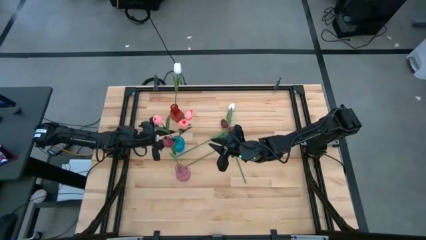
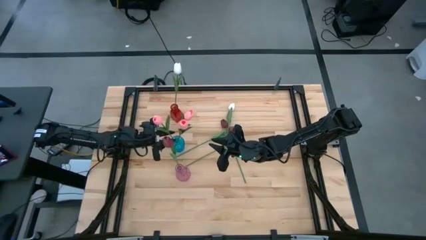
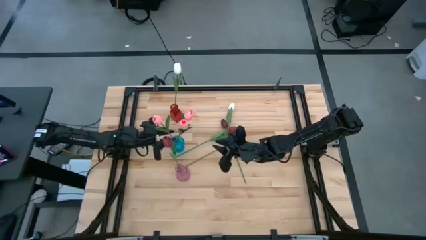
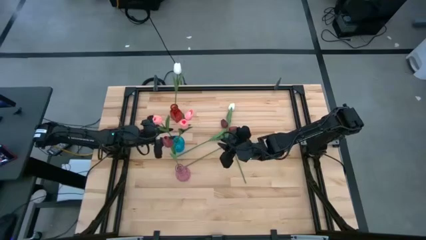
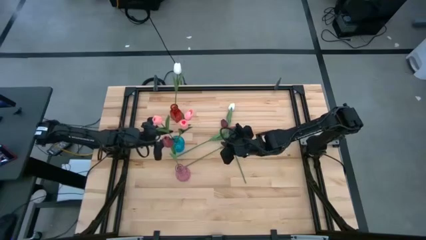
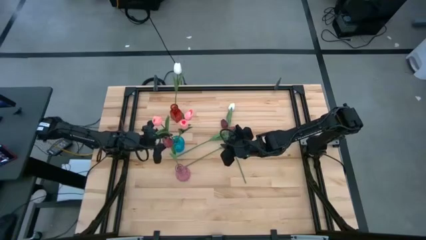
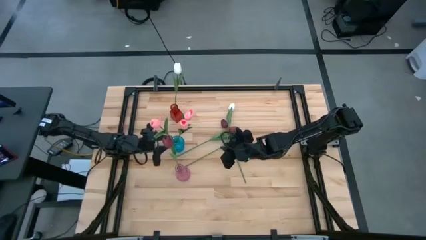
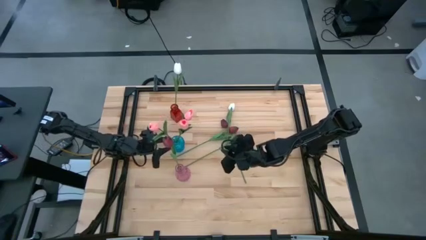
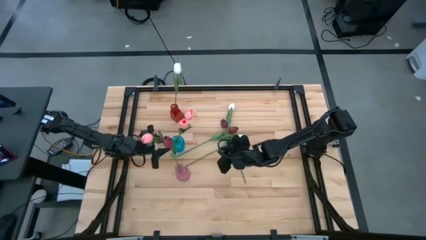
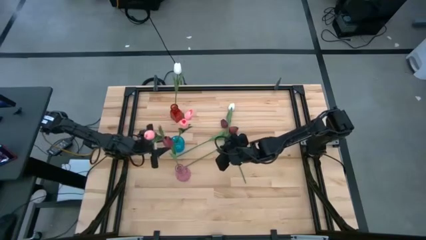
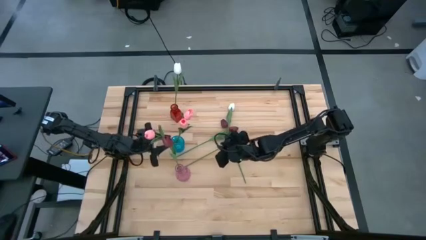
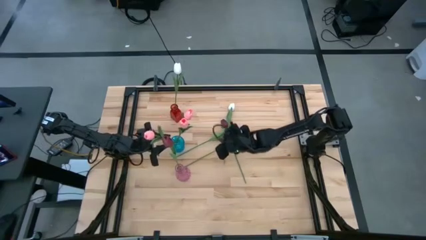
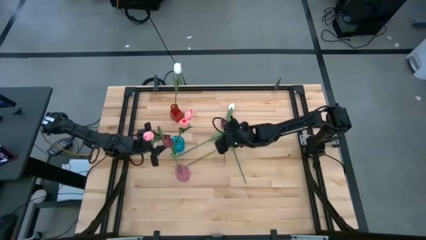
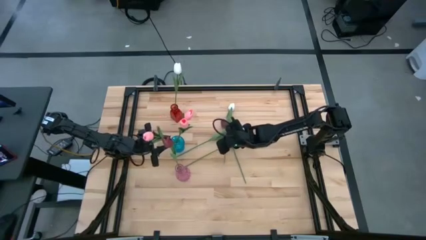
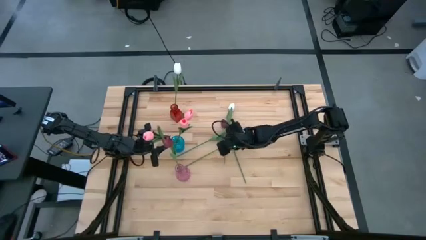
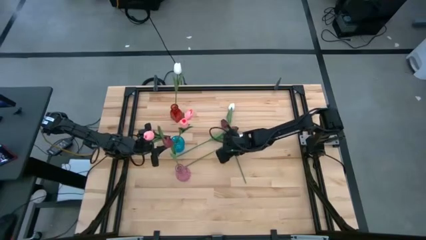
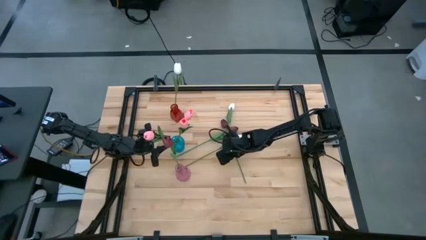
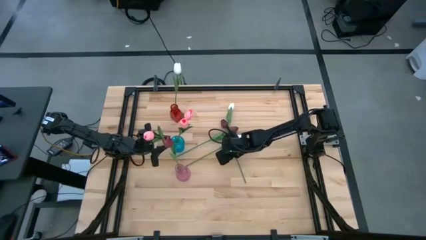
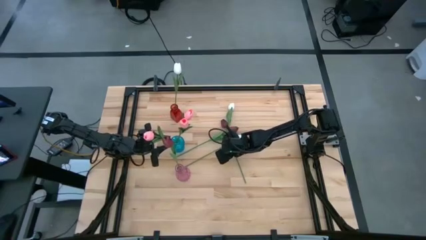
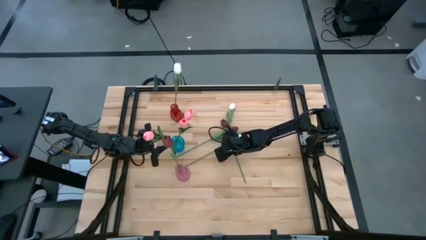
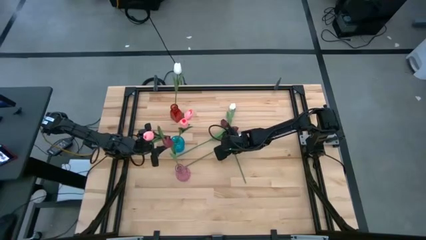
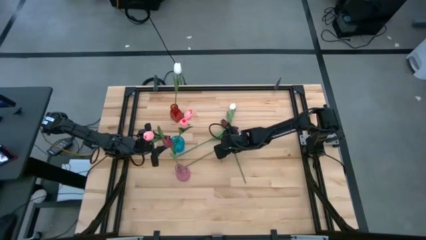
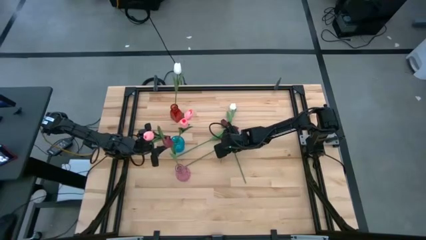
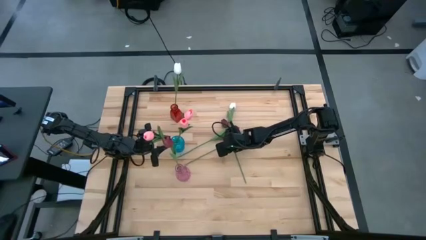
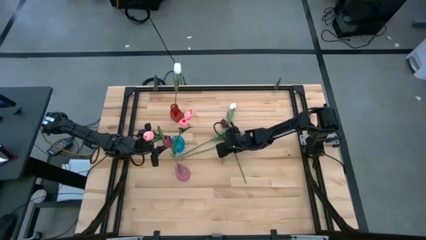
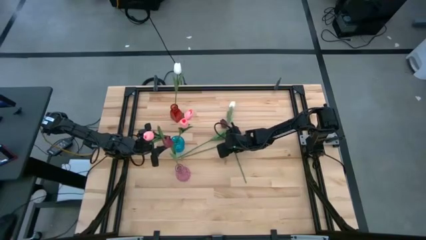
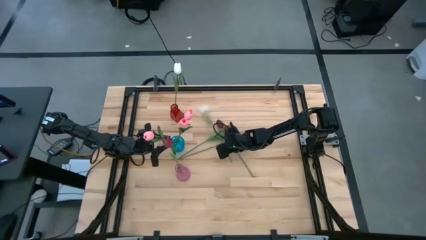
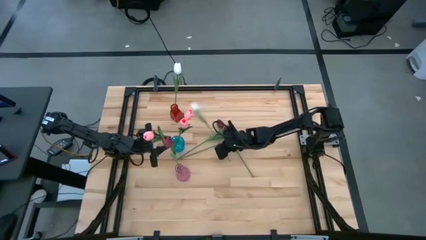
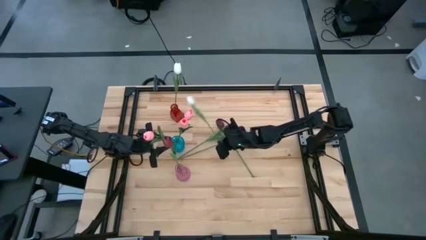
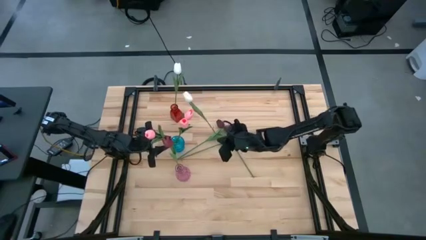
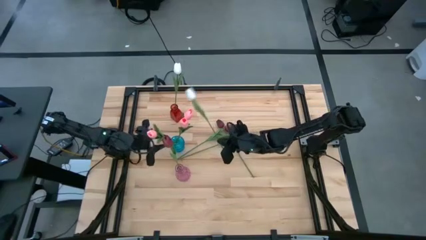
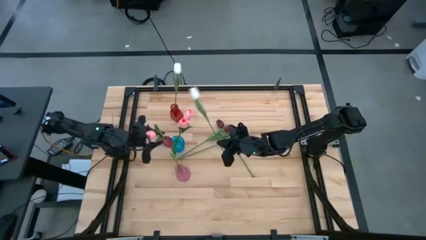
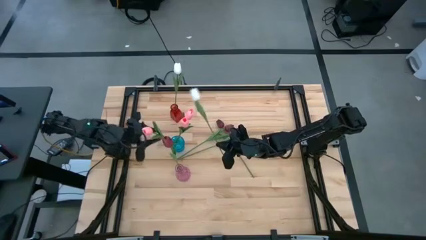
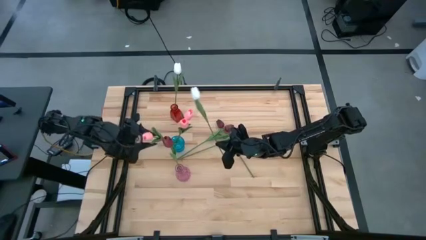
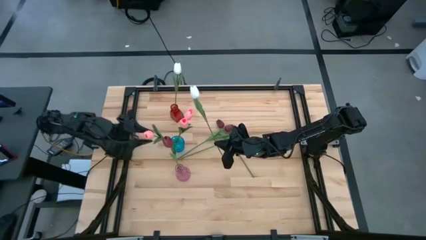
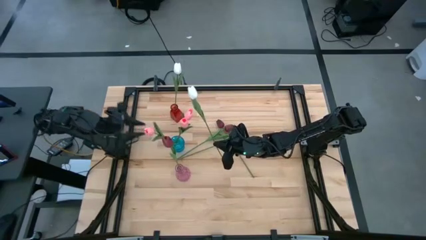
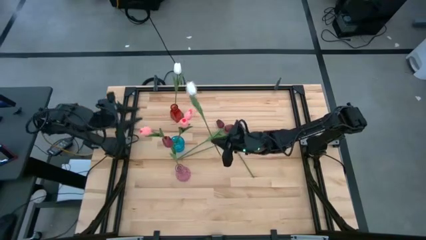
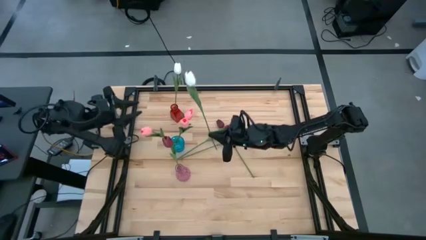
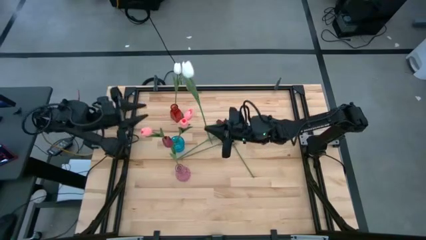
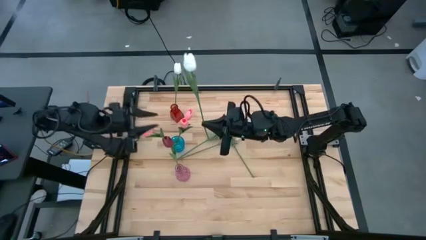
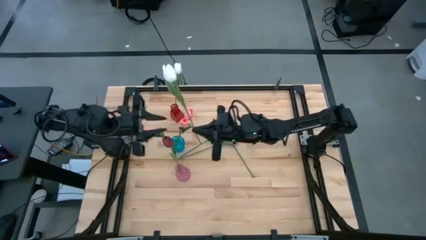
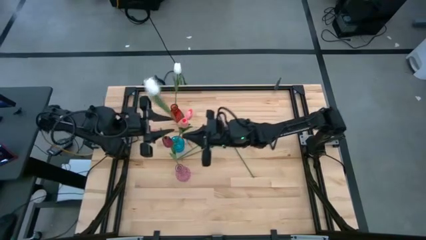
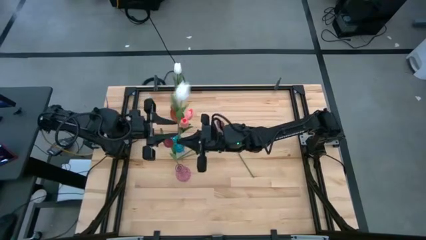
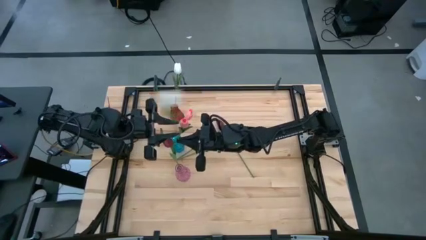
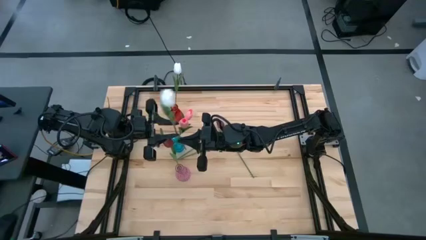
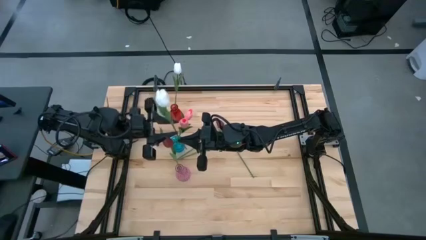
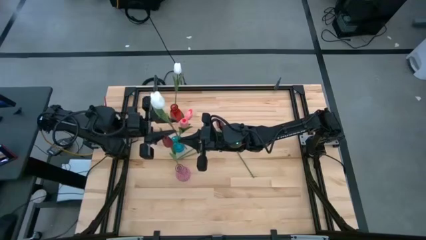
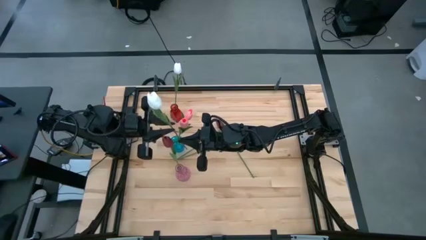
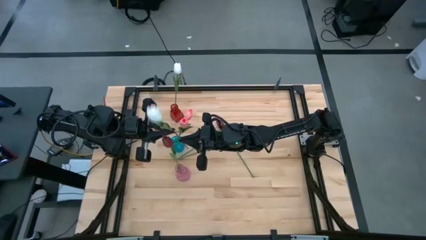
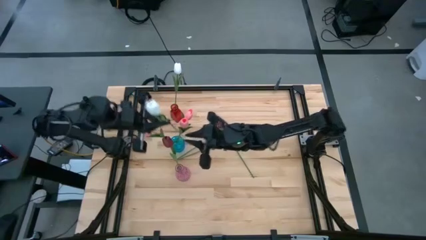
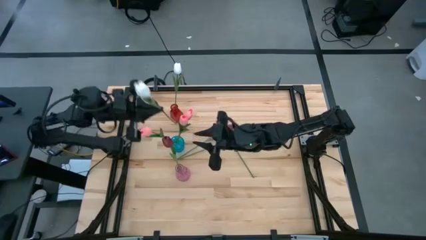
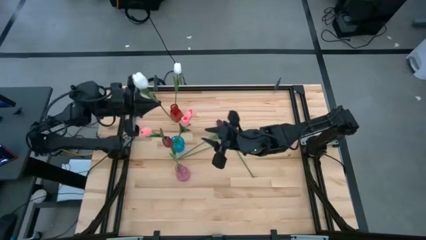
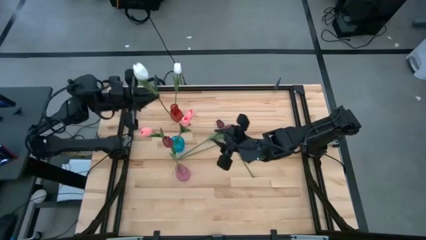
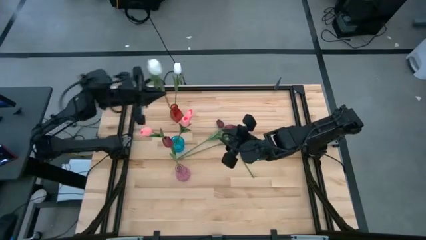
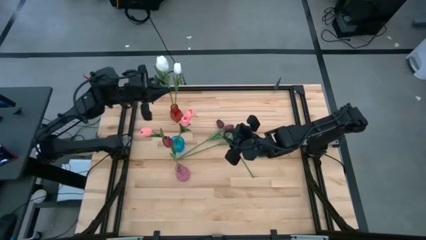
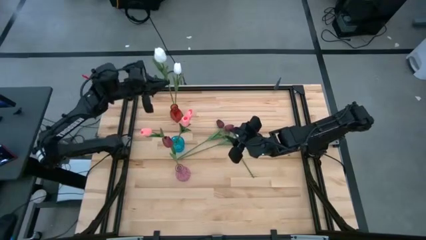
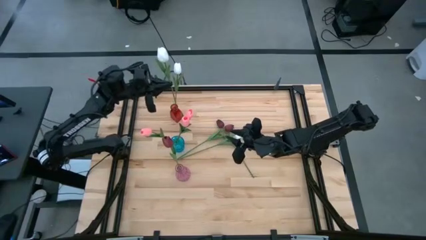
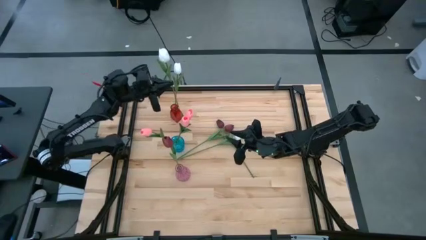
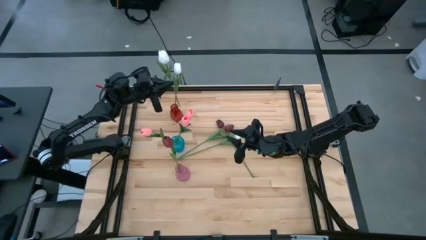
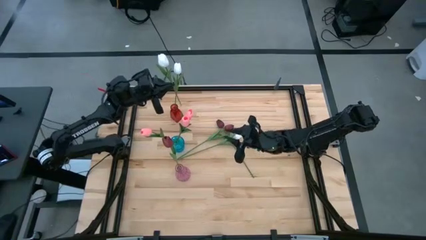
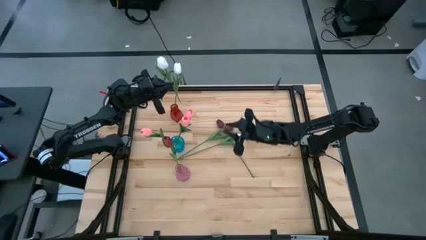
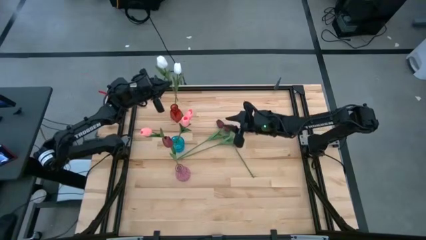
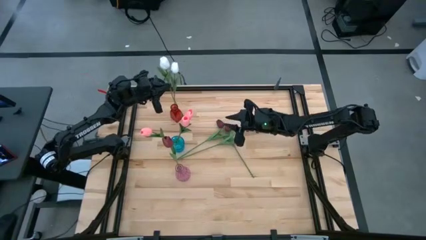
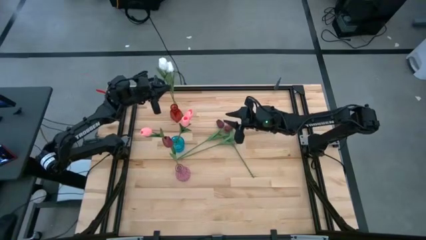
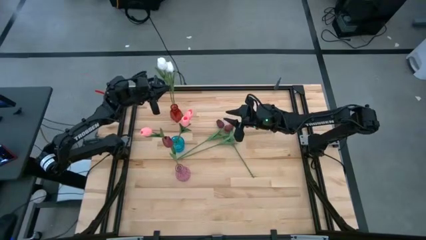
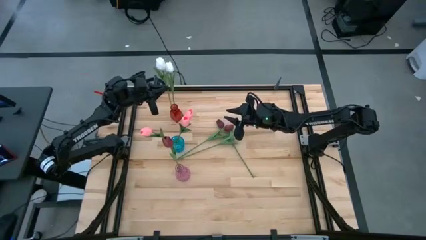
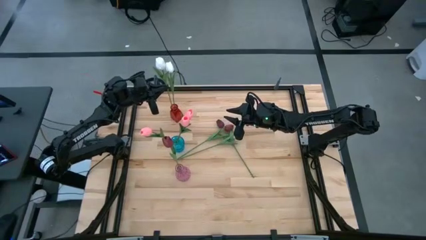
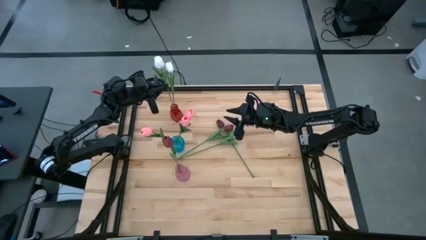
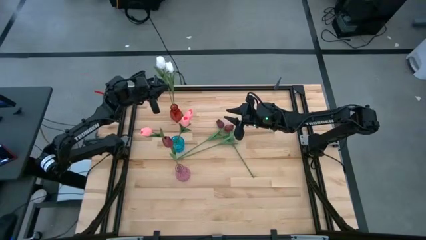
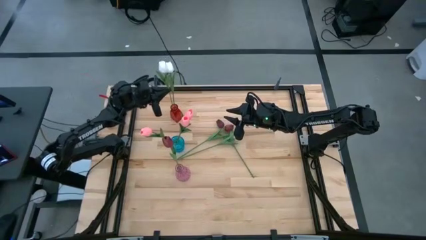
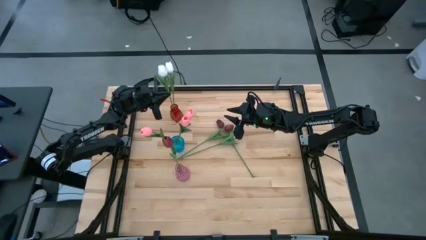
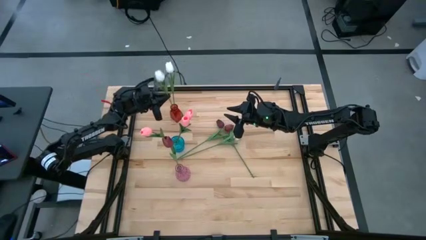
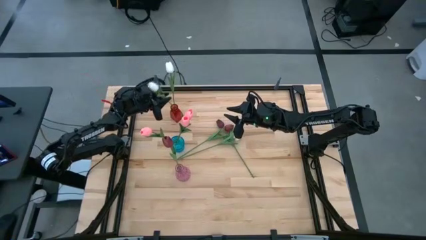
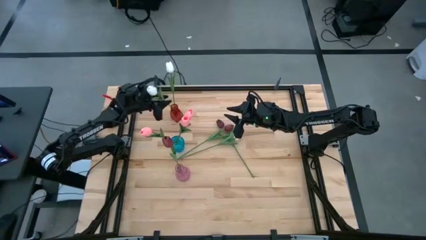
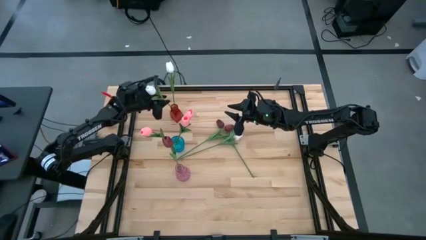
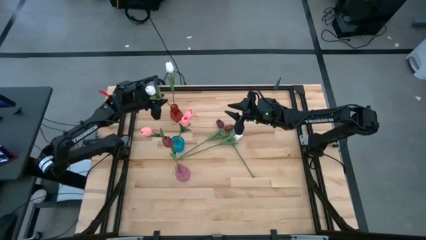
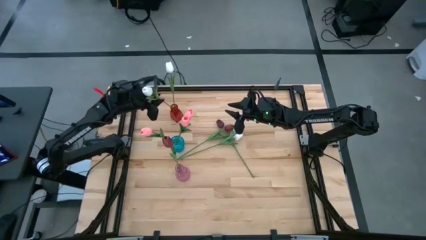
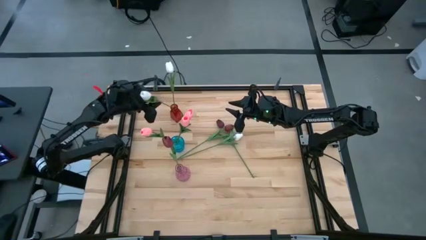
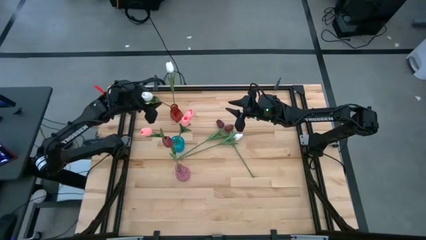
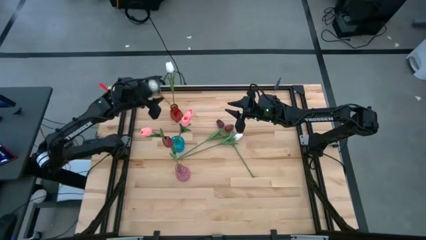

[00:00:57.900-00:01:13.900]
Task: Sort flowers into vase by color
Put the left white flower into the red vase
